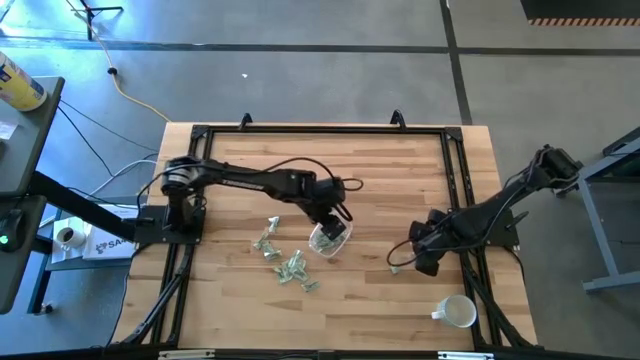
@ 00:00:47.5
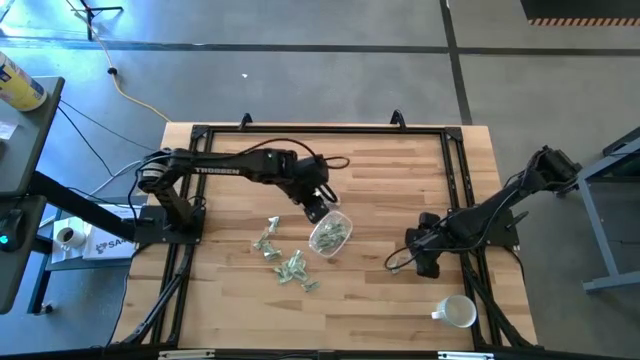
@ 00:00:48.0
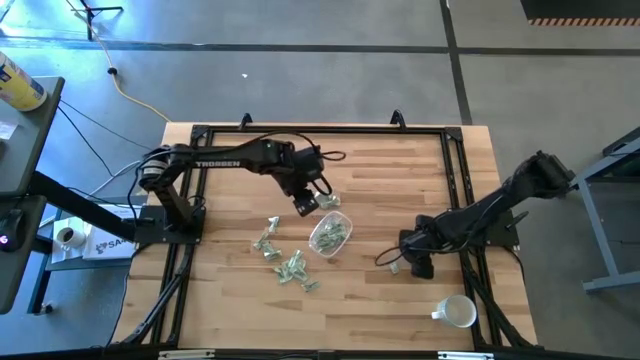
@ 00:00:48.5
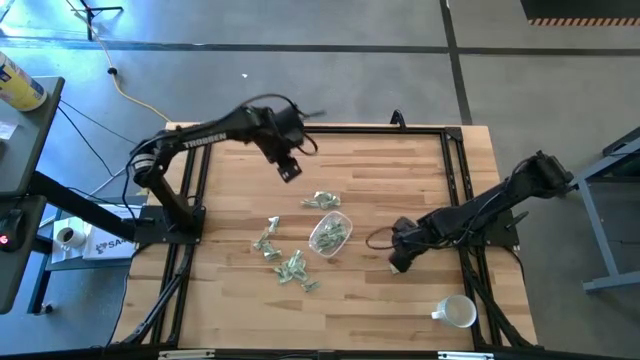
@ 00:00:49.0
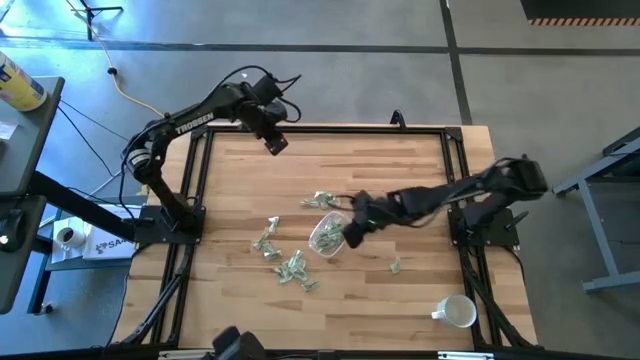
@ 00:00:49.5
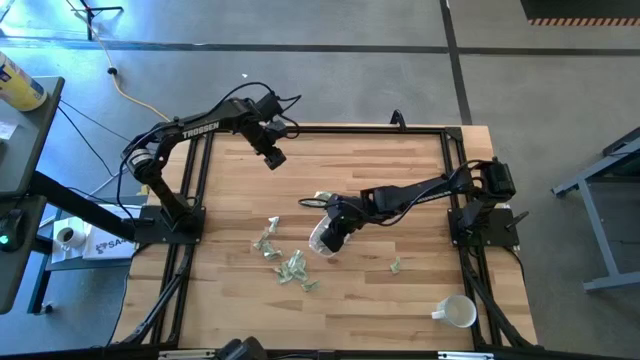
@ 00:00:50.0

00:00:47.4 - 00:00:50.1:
Task: Pick and place Stevia / Truvia into bins
Put the stevia packet into the transparent bin

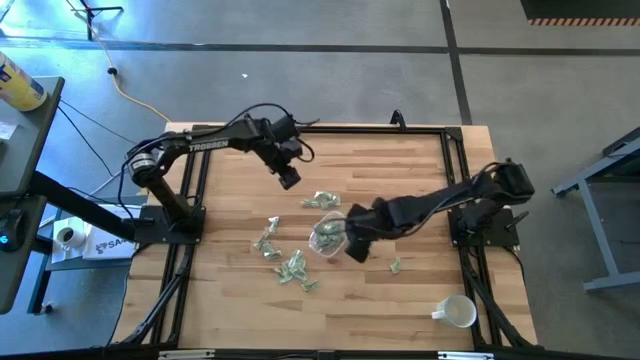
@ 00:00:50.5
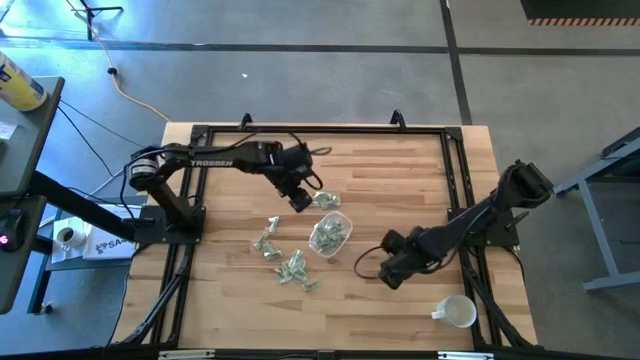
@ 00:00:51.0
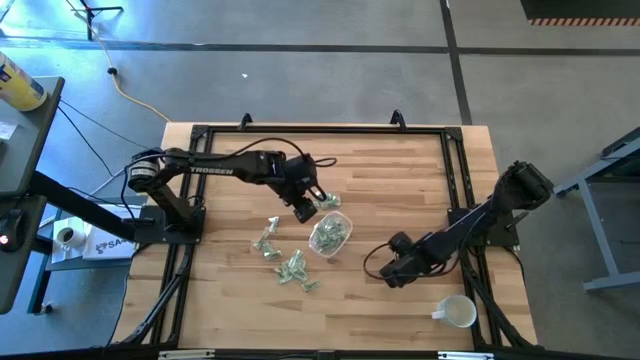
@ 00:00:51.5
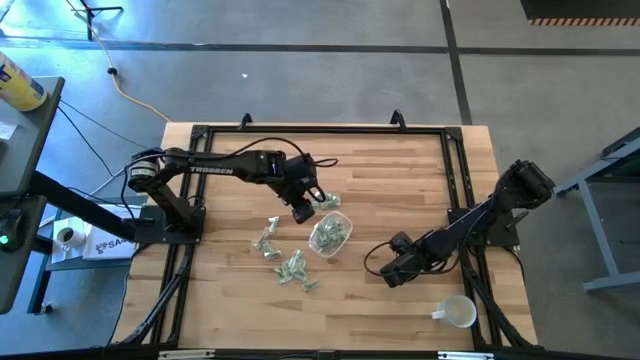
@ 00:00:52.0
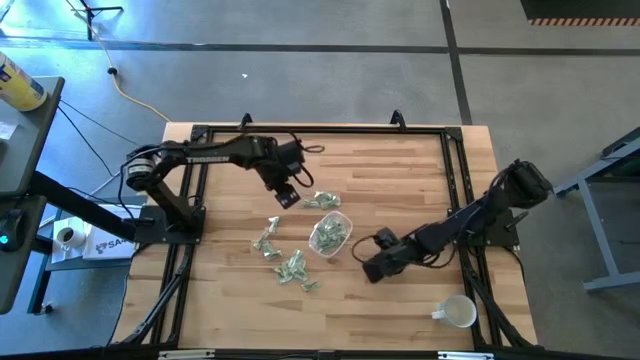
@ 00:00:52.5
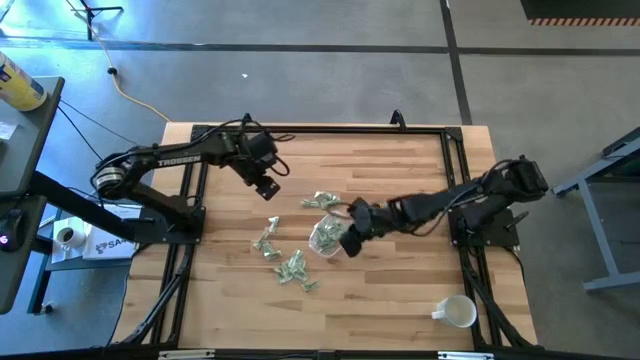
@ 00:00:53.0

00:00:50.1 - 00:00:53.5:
Put the stevia packet into the transparent bin

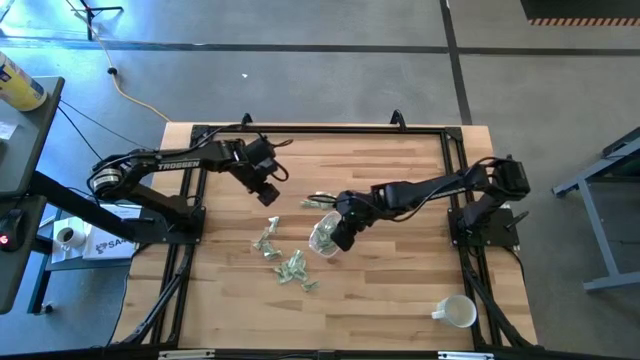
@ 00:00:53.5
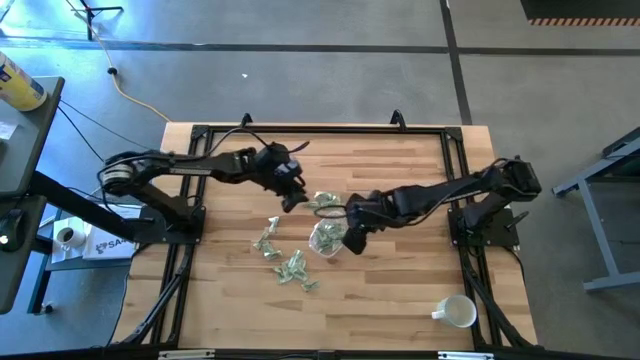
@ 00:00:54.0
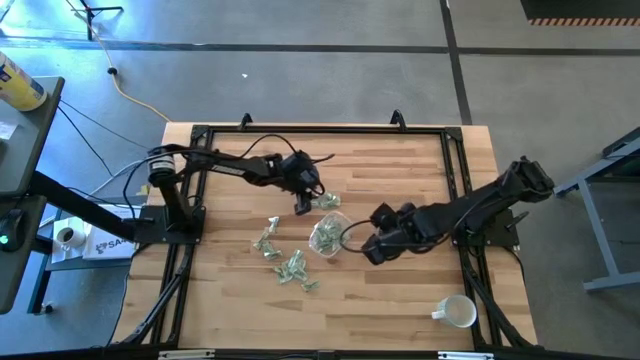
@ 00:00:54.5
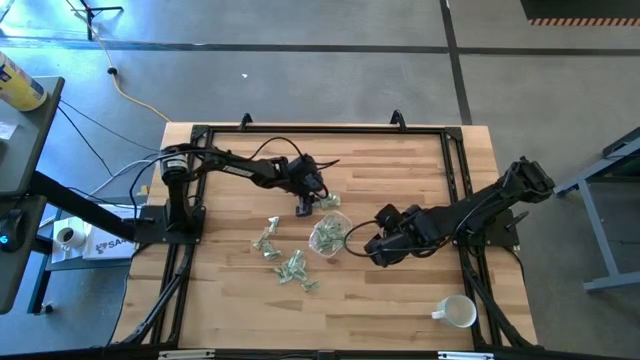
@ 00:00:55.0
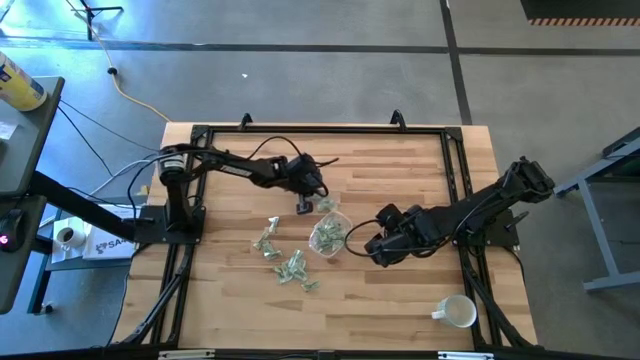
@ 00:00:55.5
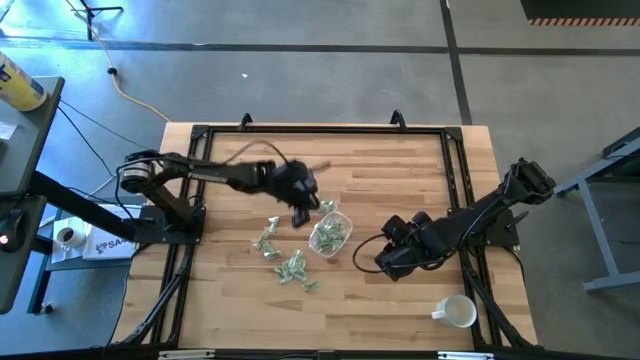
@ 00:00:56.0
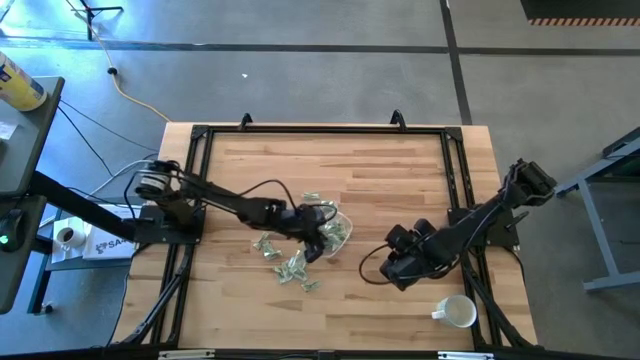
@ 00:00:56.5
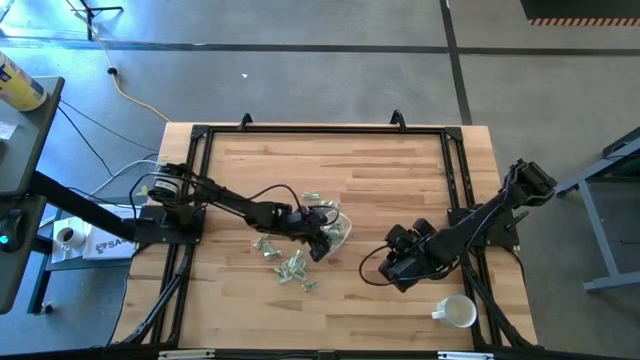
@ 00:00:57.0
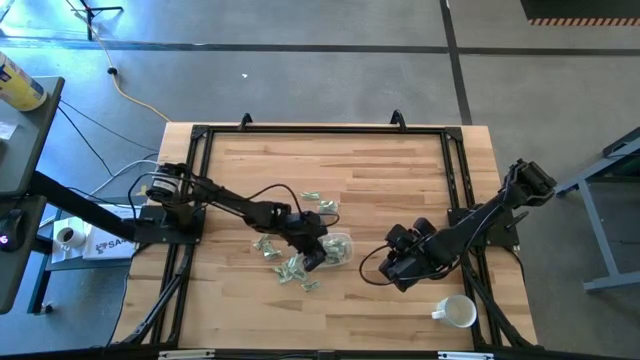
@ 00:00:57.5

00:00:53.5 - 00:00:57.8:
Put the stevia packet into the transparent bin

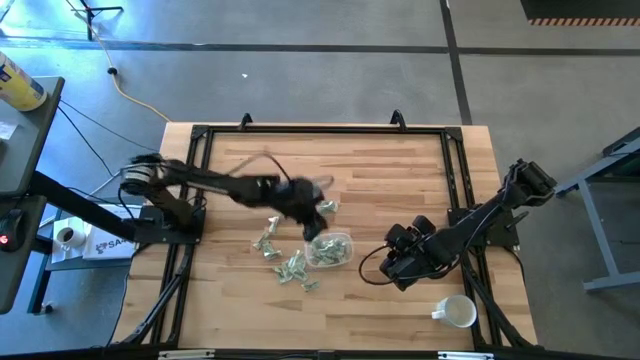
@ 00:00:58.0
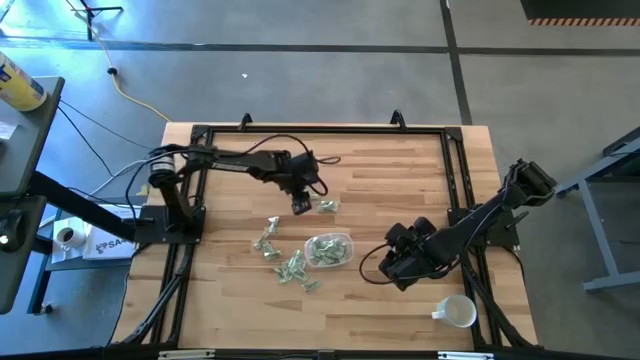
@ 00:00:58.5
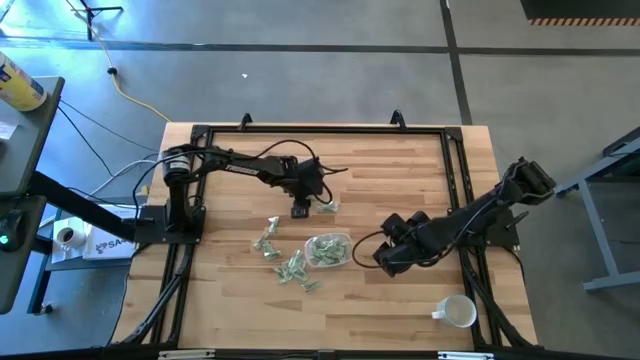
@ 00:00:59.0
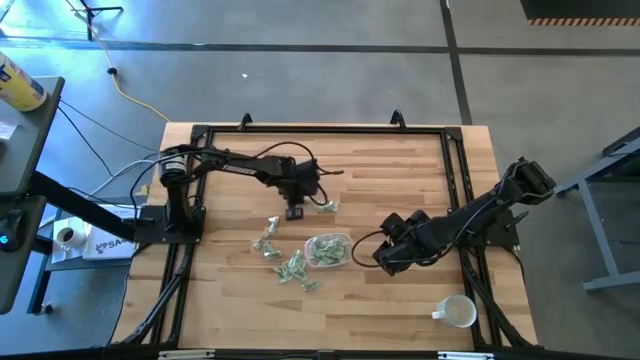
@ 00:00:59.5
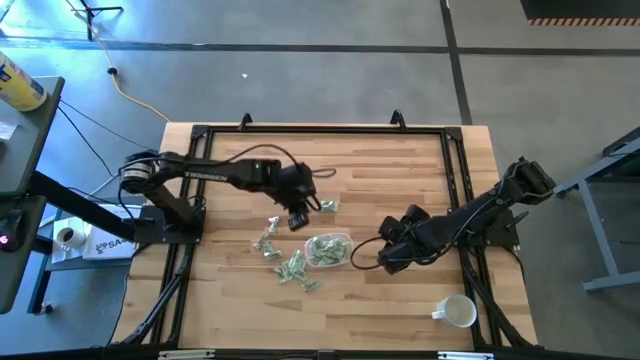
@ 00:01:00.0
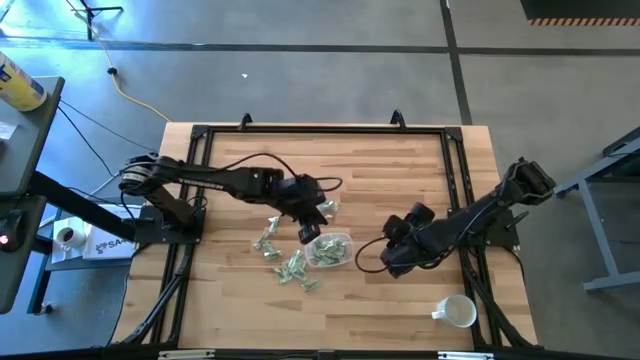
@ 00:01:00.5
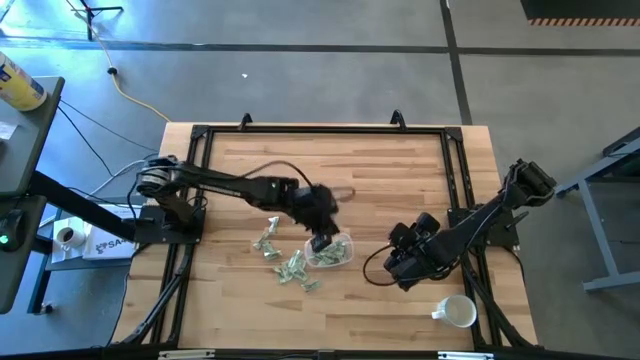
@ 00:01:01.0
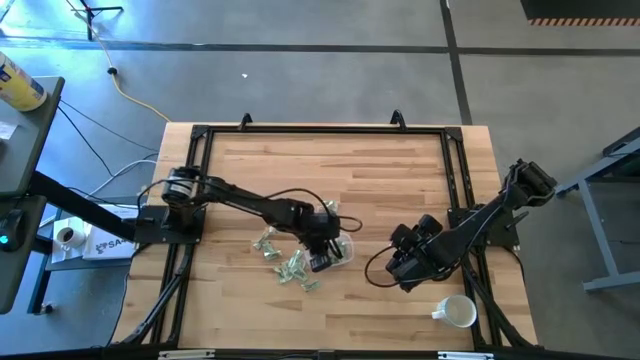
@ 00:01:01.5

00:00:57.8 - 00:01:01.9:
Put the stevia packet into the transparent bin

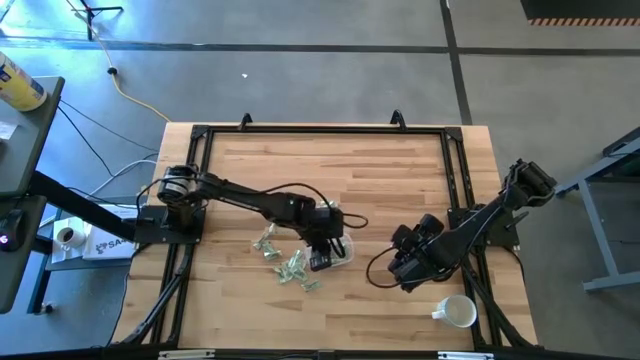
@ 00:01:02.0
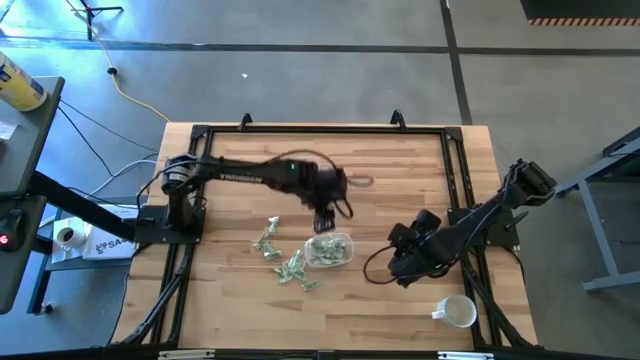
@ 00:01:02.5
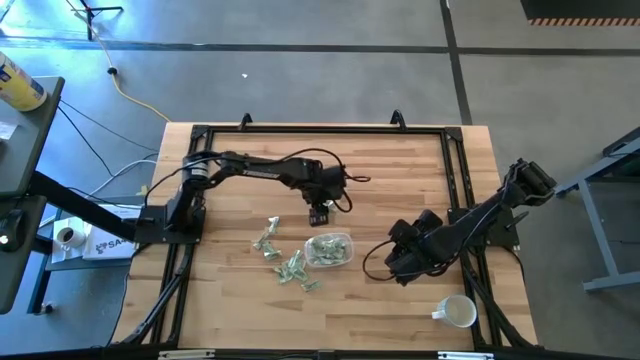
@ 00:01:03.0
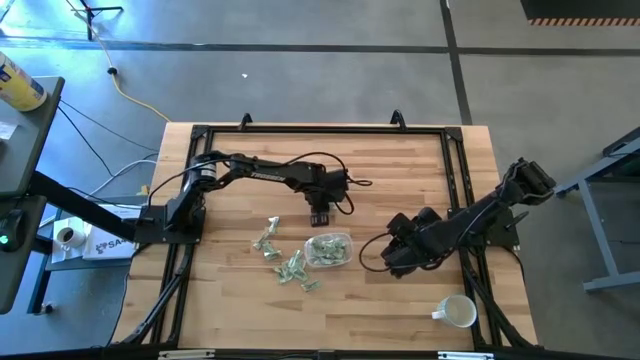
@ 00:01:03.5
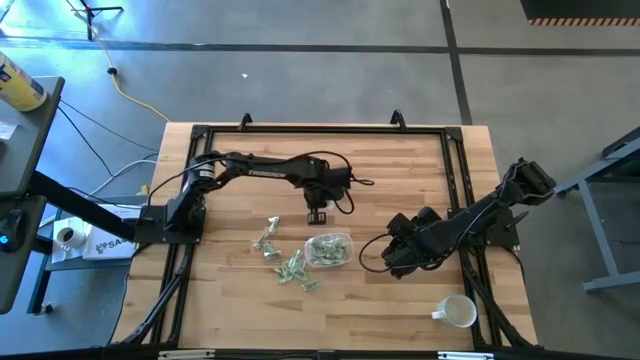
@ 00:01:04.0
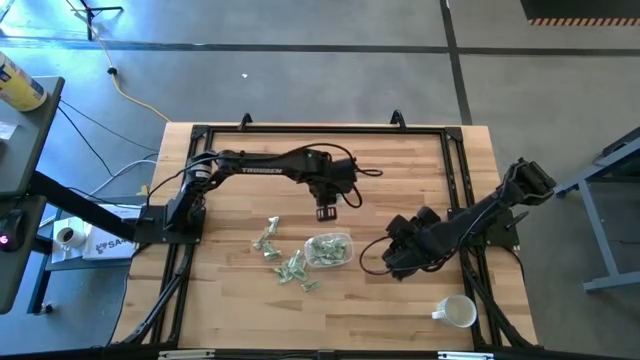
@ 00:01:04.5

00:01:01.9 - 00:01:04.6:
Put the stevia packet into the transparent bin

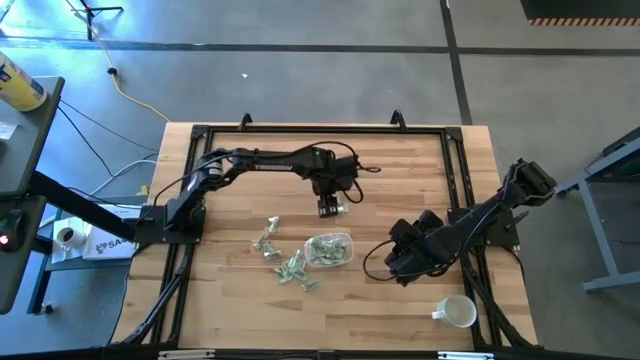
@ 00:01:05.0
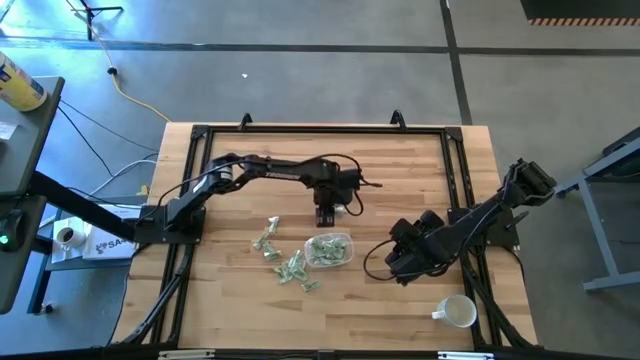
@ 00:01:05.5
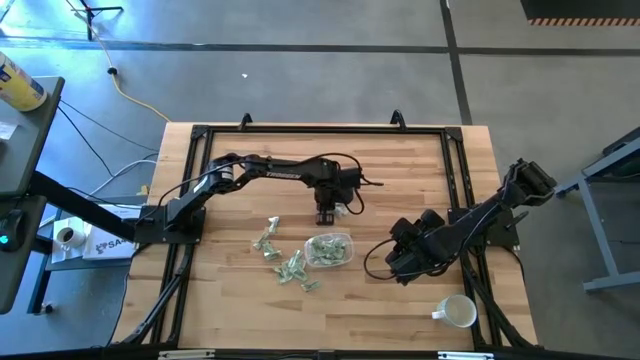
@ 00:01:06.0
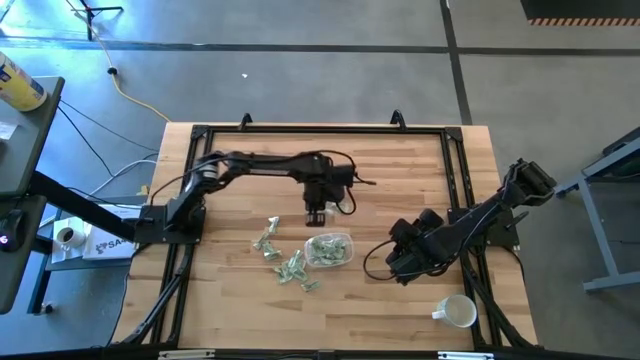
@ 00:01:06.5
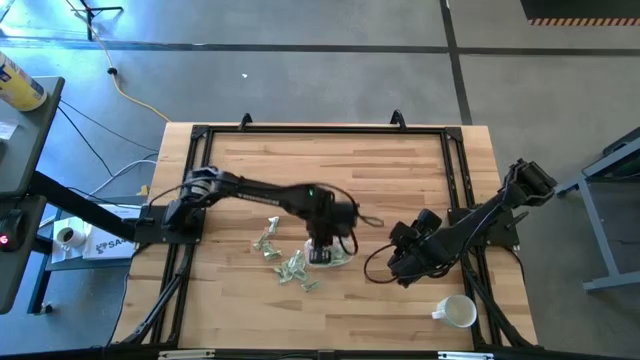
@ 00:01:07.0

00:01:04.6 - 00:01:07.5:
Put the stevia packet into the transparent bin

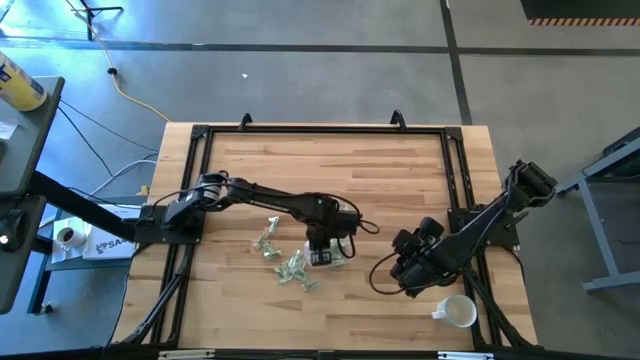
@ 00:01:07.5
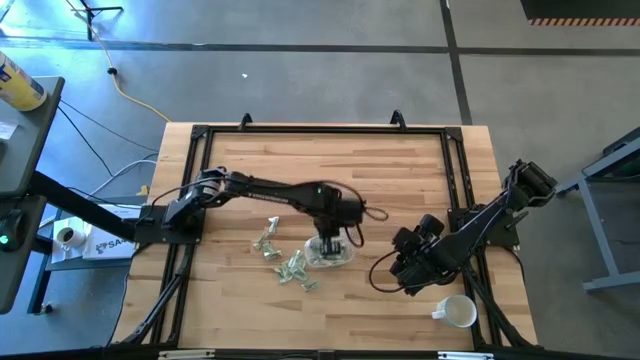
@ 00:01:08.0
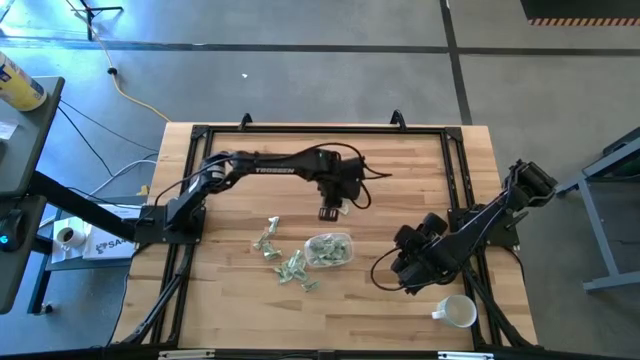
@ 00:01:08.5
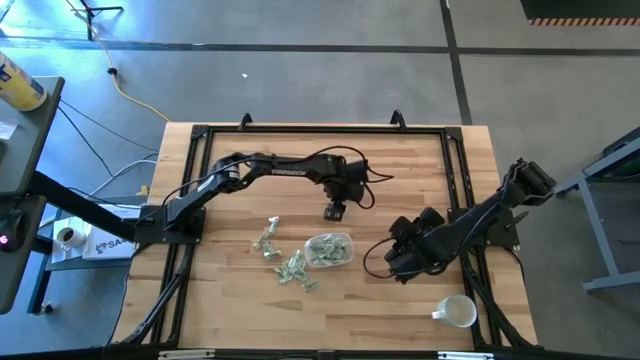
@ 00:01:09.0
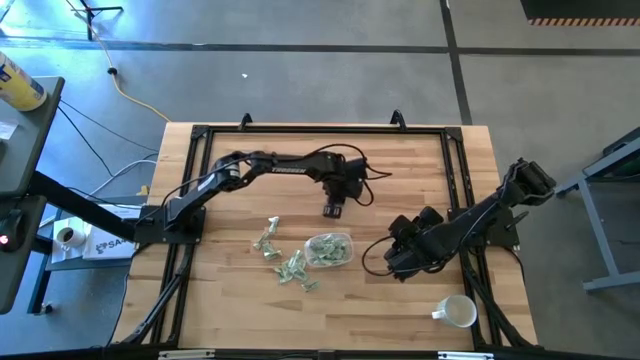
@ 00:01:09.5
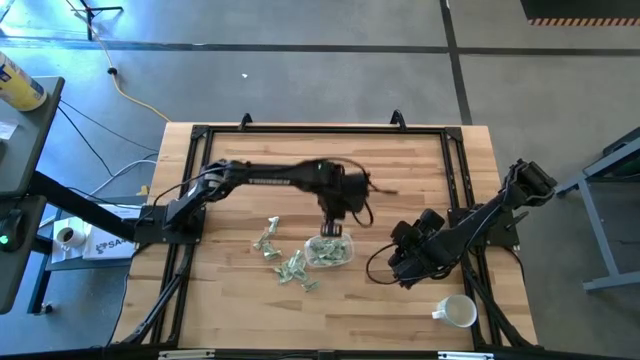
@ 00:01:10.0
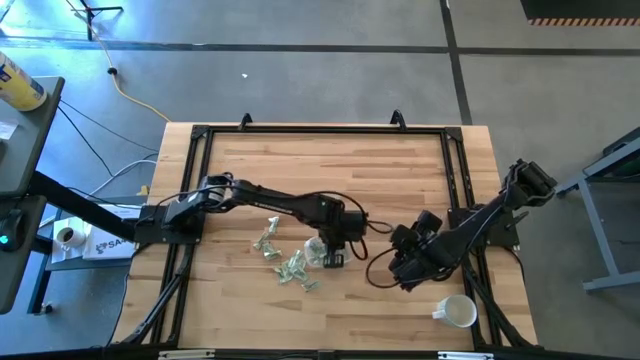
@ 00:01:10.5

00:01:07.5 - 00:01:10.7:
Put the stevia packet into the transparent bin
